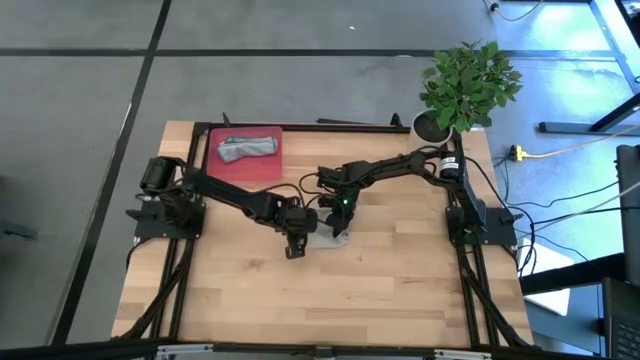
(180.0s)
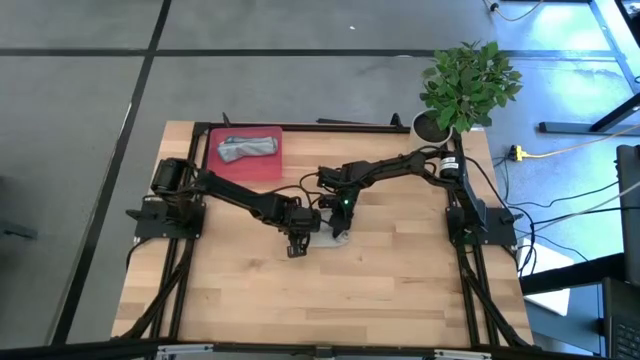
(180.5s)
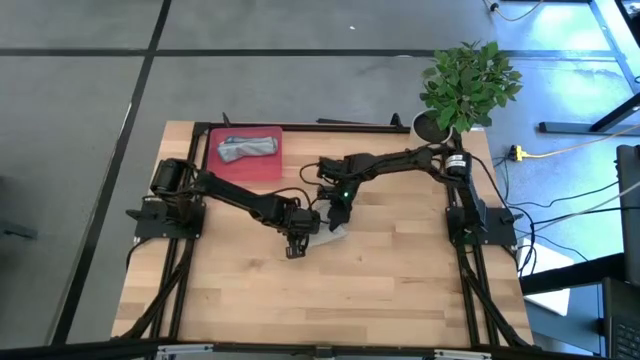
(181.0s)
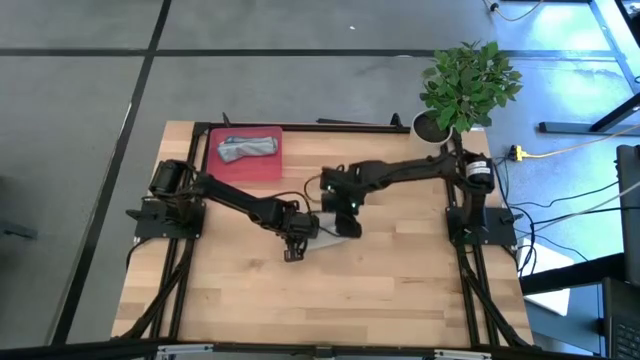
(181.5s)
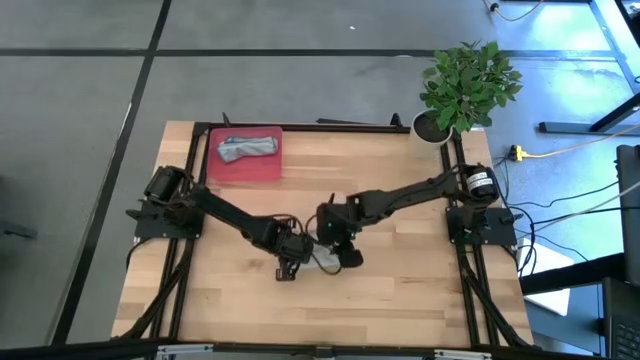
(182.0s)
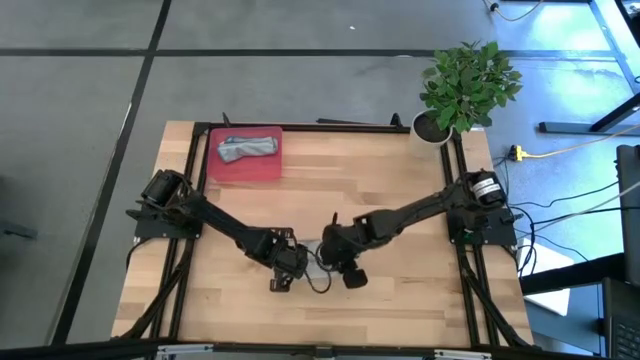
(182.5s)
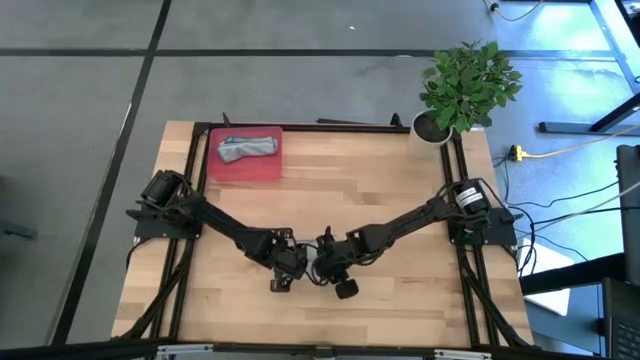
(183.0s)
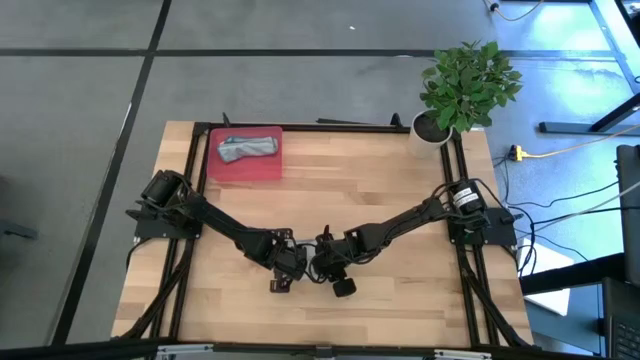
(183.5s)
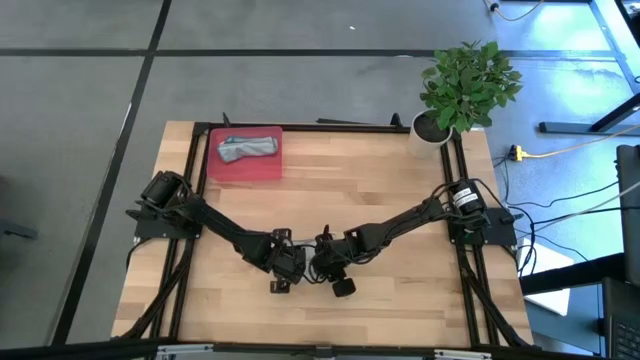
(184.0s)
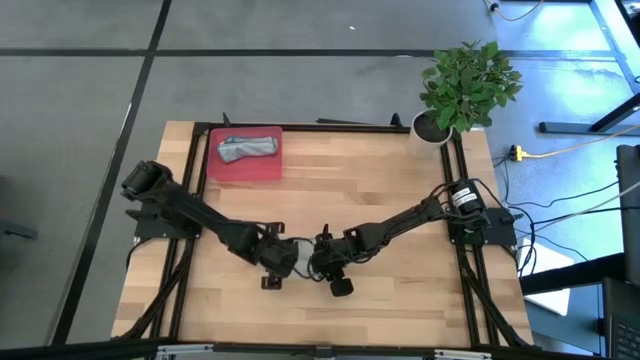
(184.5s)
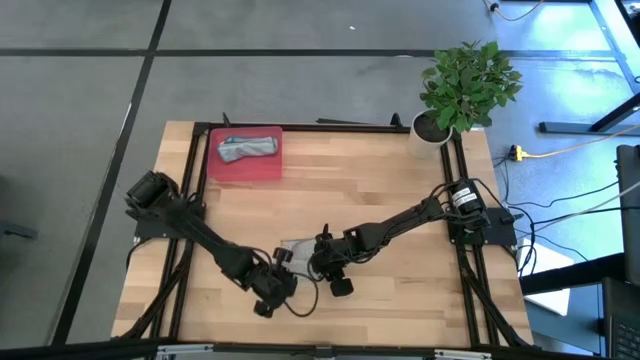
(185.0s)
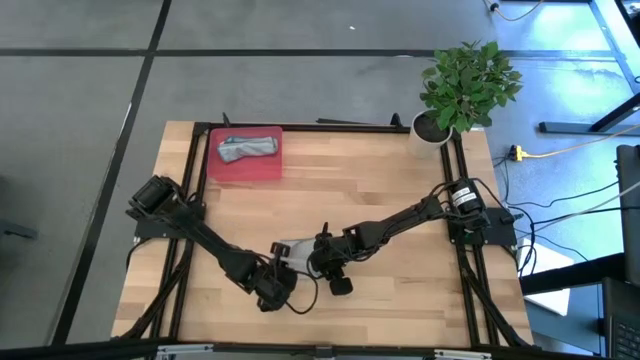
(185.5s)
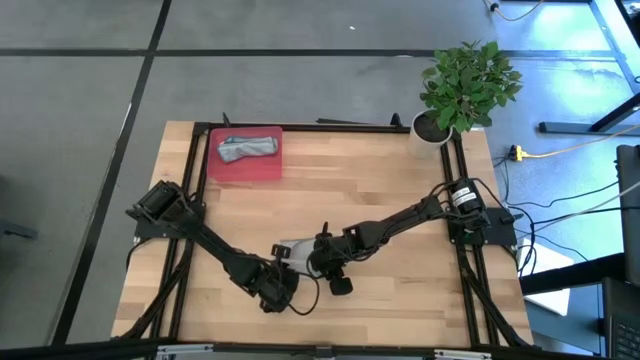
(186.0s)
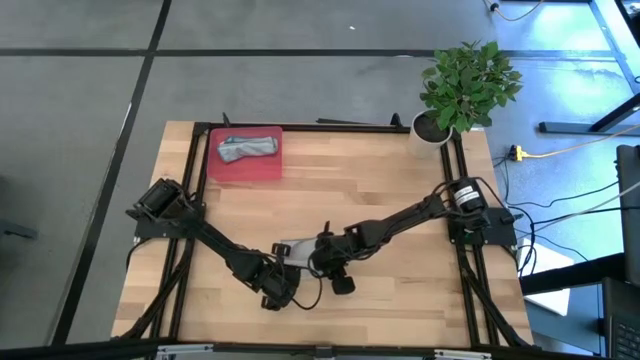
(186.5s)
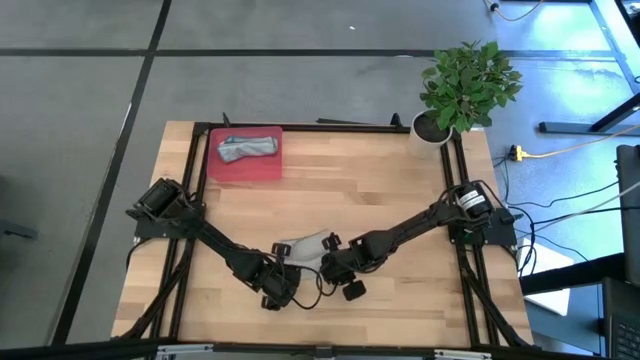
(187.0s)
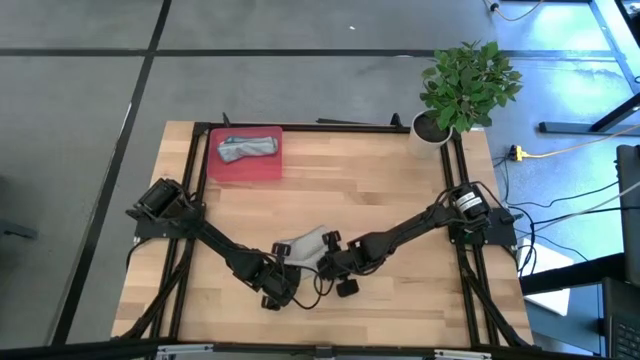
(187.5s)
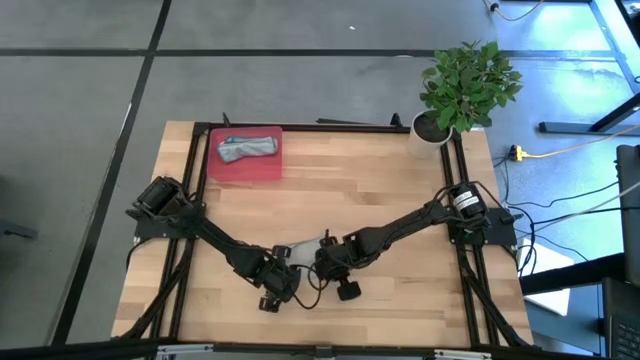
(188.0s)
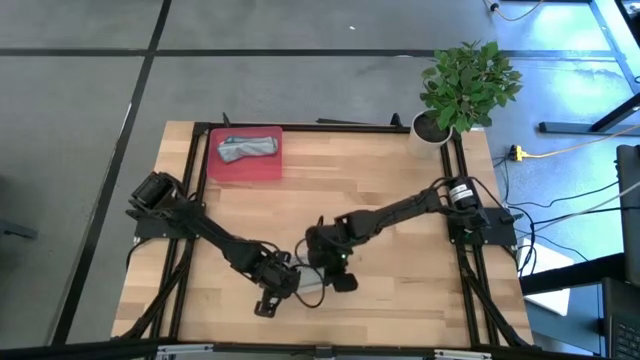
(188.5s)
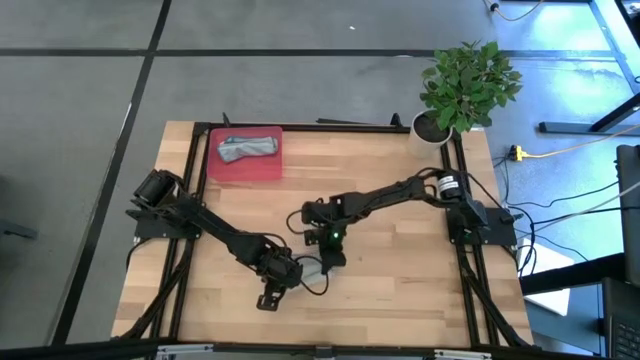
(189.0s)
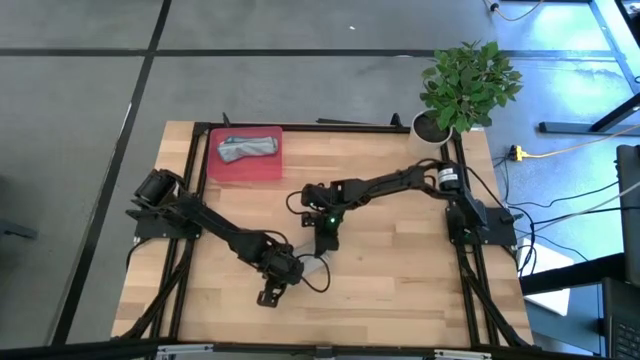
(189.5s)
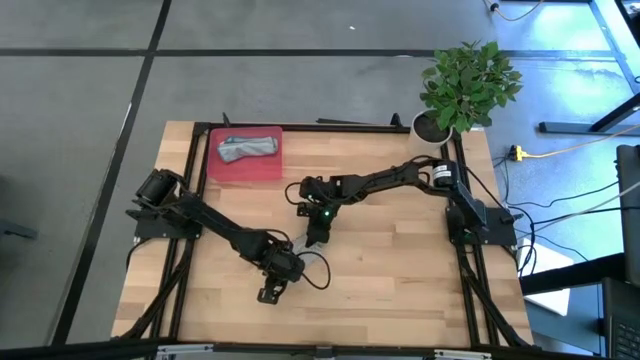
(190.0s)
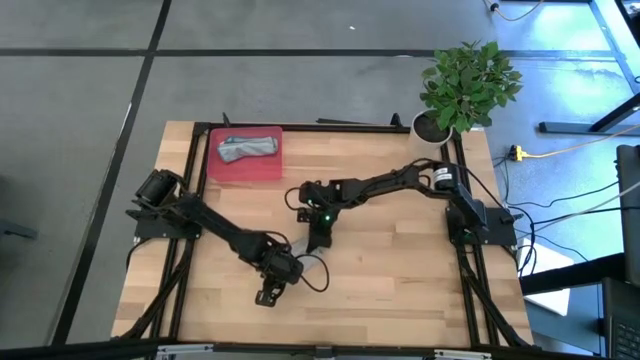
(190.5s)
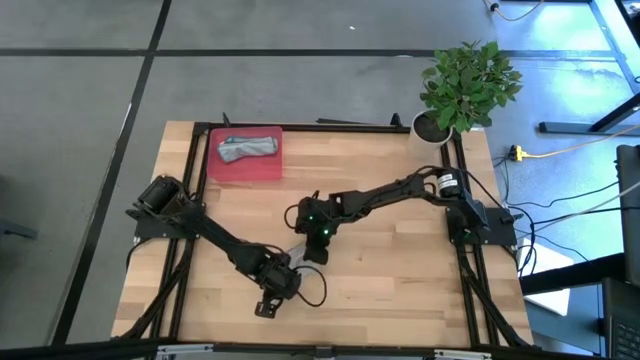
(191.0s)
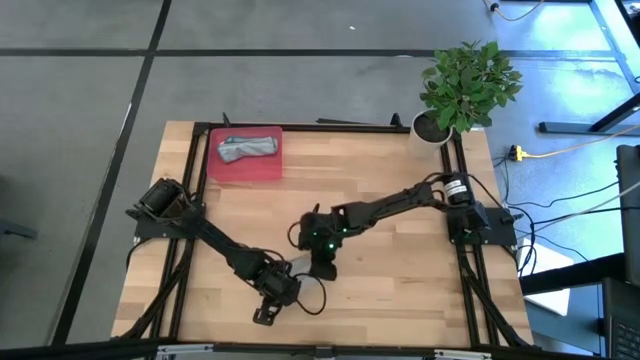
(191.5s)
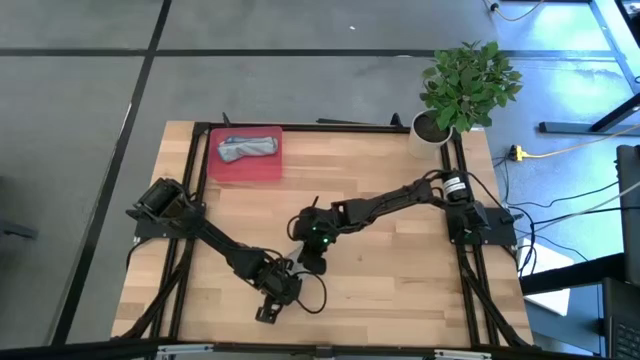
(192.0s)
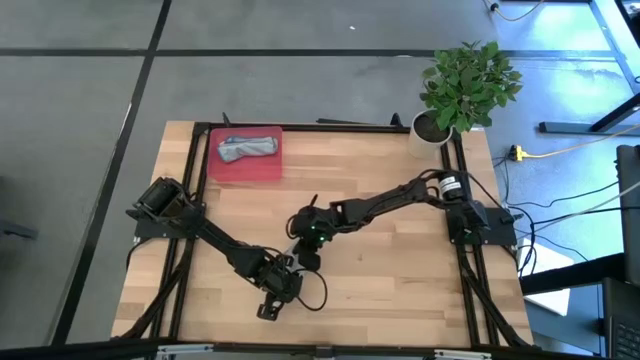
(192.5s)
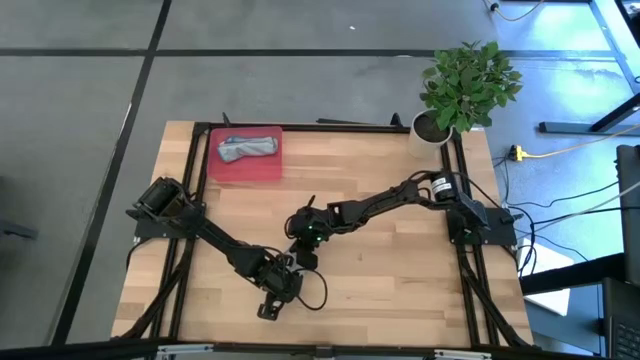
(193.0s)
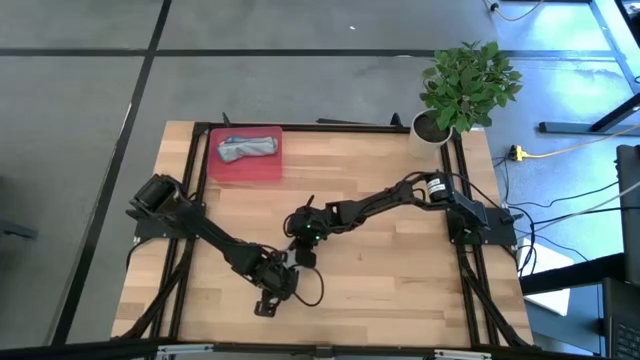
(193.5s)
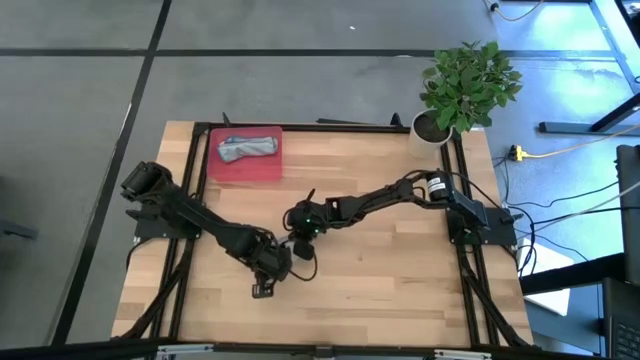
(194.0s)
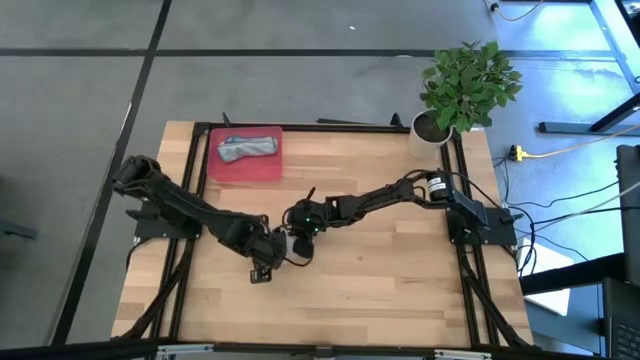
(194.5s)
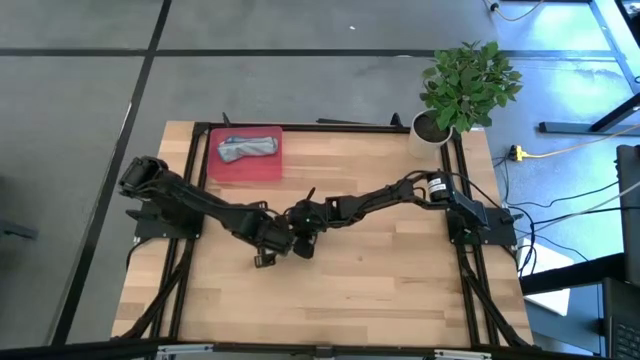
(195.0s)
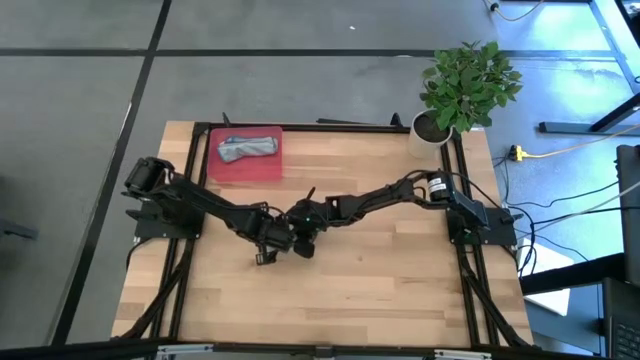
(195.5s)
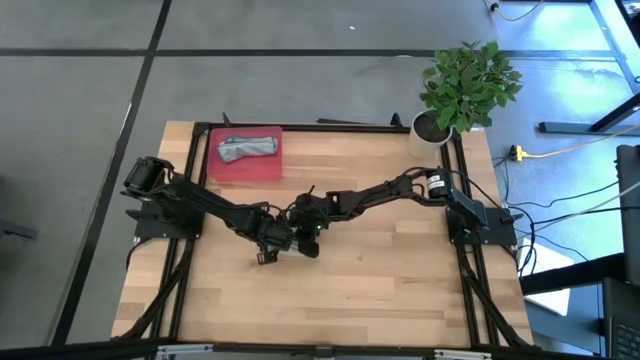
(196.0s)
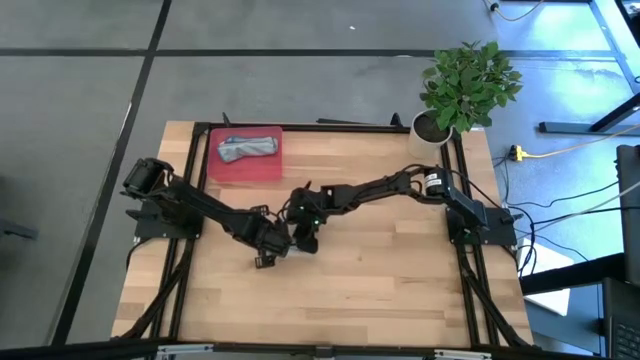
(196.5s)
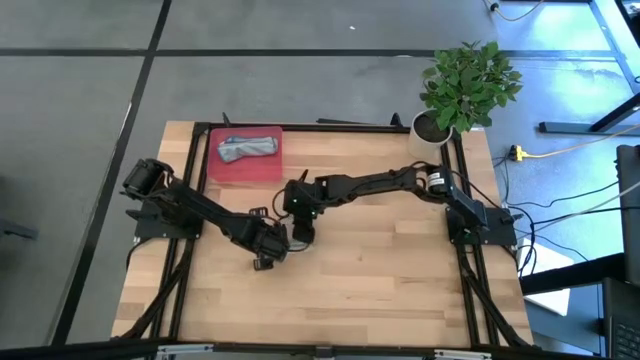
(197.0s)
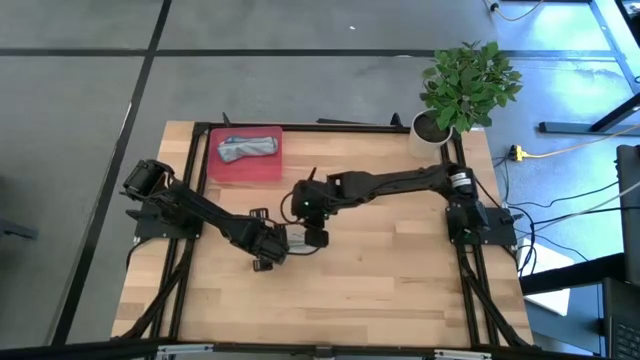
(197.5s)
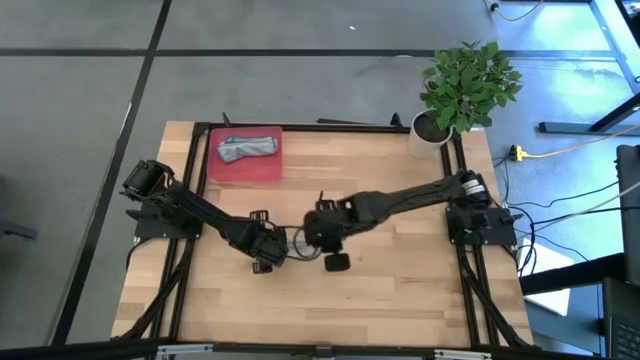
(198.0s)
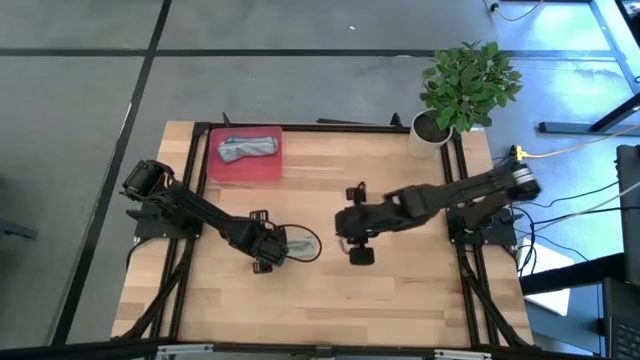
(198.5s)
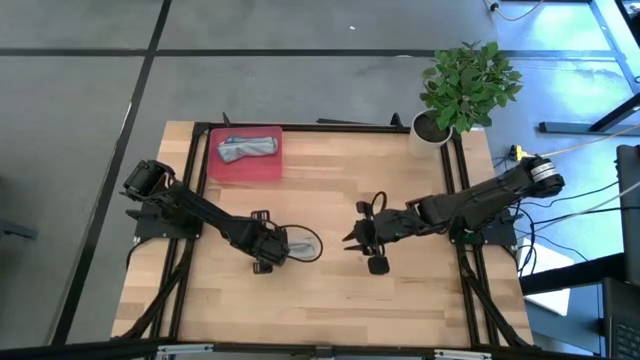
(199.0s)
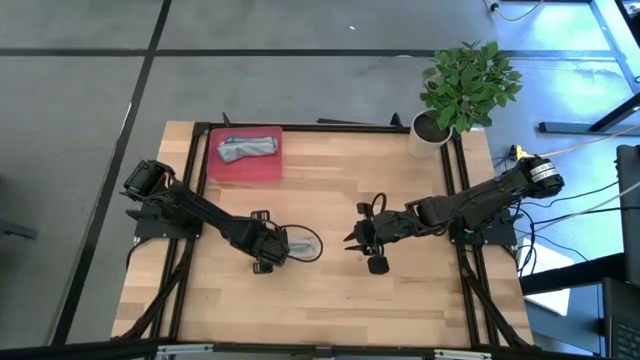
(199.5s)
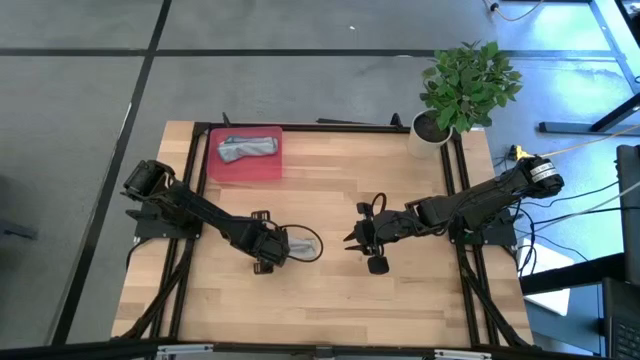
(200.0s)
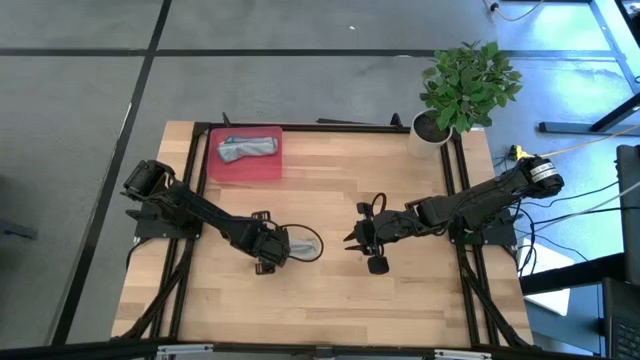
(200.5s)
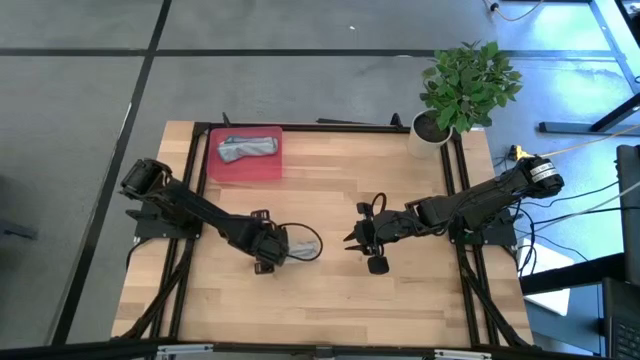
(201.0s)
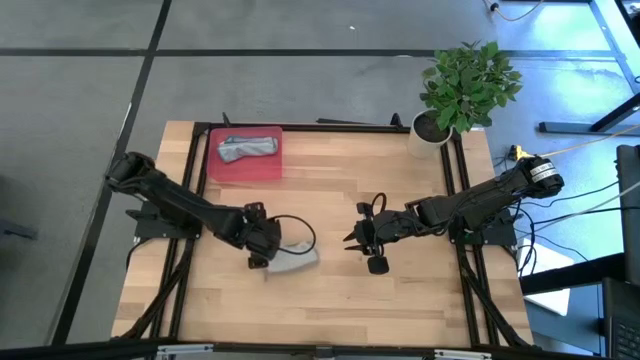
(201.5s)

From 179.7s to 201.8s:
Task: Roll microfiber towels into tight, uniform cylinder then place into a basket
Roll the gray towel
